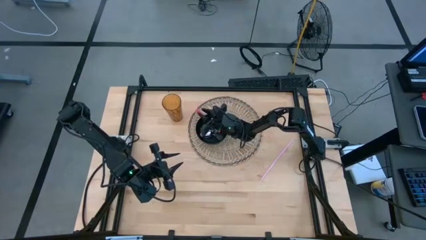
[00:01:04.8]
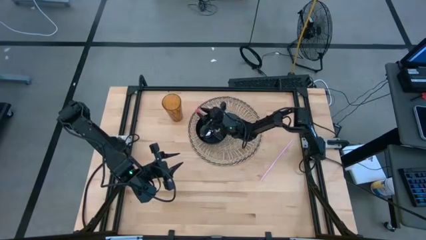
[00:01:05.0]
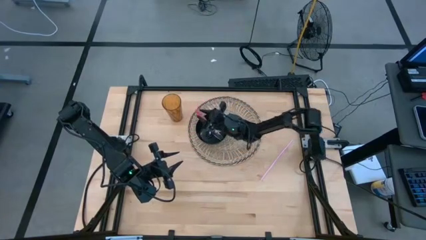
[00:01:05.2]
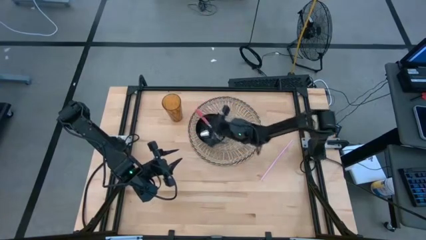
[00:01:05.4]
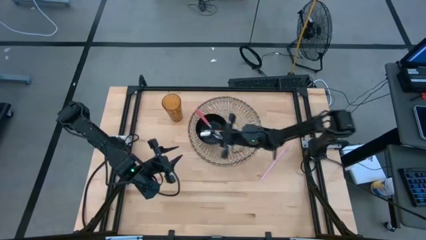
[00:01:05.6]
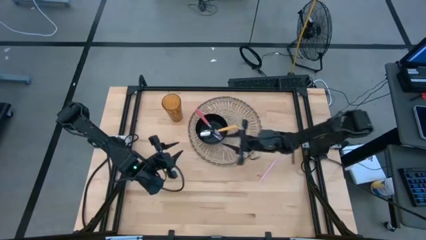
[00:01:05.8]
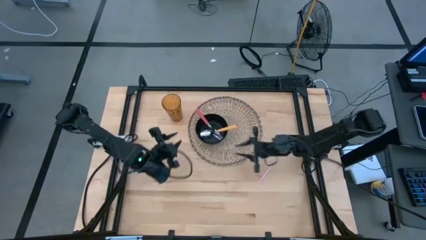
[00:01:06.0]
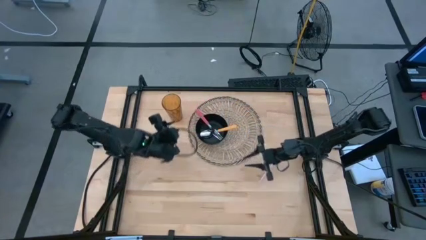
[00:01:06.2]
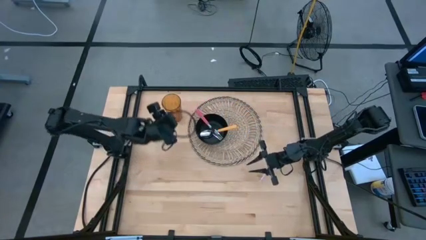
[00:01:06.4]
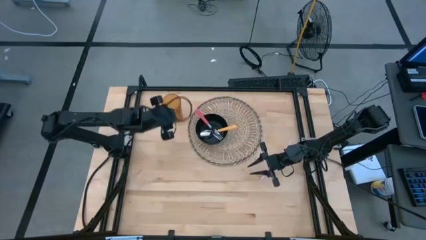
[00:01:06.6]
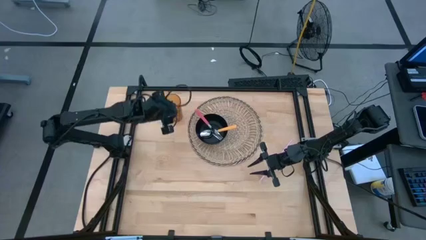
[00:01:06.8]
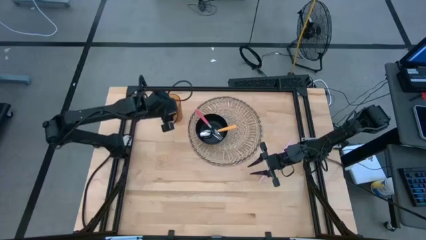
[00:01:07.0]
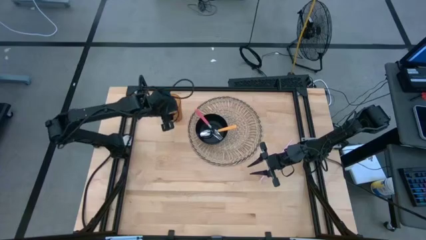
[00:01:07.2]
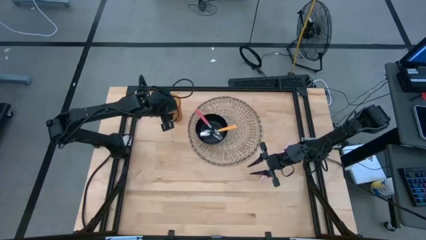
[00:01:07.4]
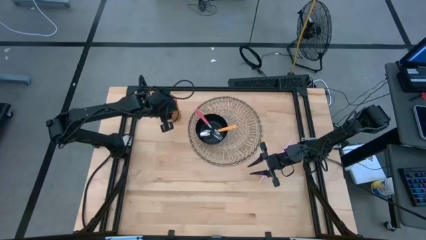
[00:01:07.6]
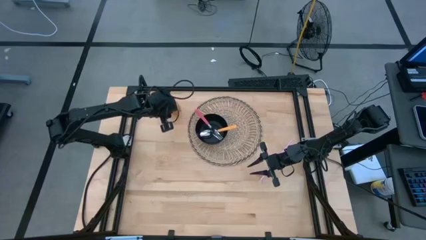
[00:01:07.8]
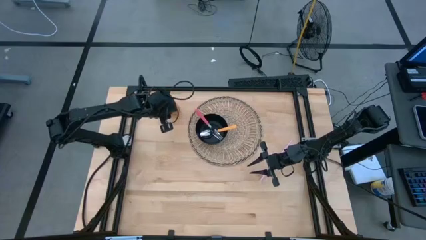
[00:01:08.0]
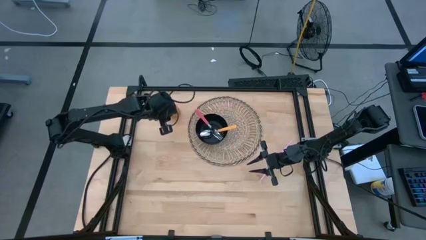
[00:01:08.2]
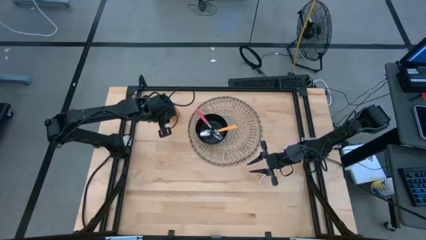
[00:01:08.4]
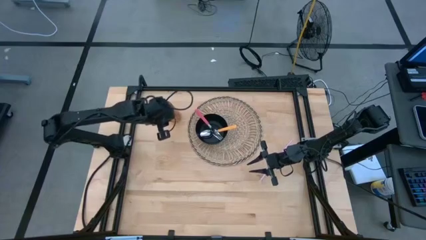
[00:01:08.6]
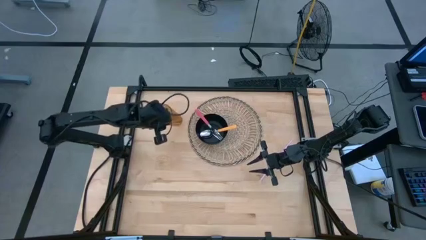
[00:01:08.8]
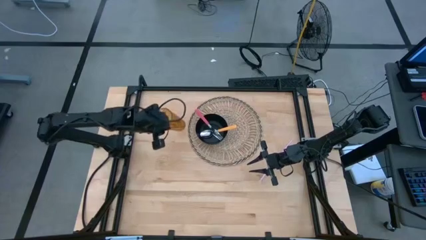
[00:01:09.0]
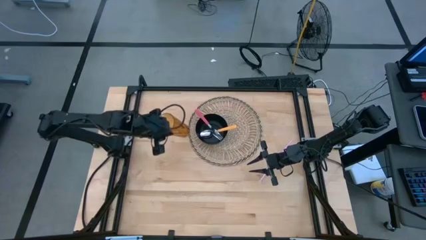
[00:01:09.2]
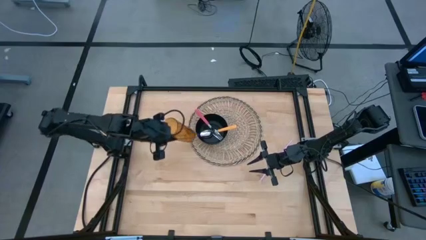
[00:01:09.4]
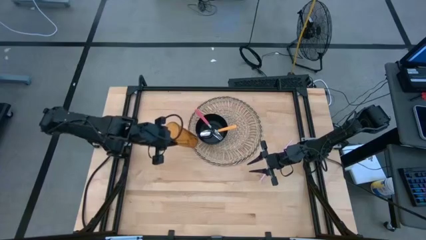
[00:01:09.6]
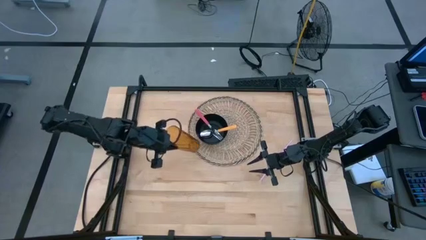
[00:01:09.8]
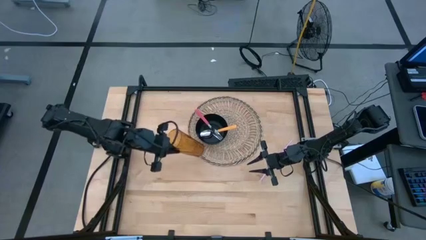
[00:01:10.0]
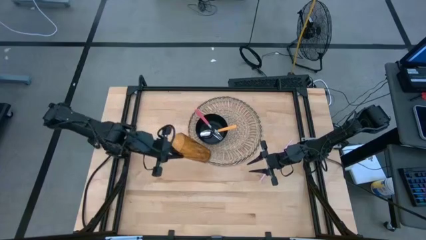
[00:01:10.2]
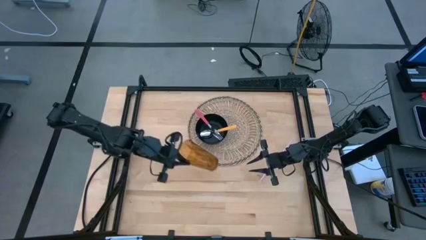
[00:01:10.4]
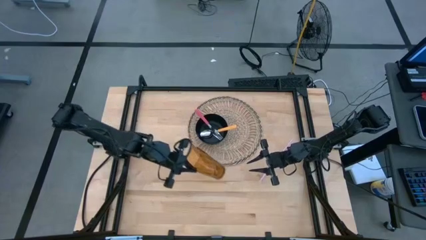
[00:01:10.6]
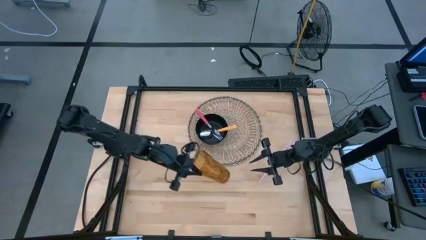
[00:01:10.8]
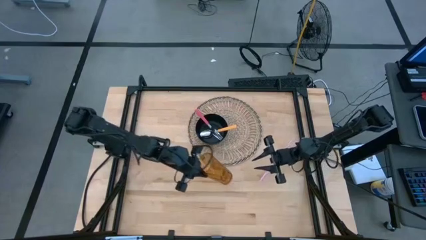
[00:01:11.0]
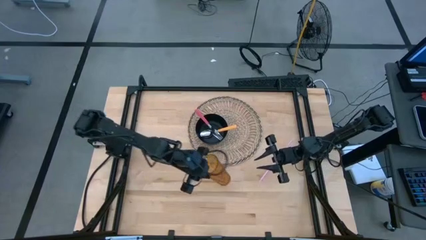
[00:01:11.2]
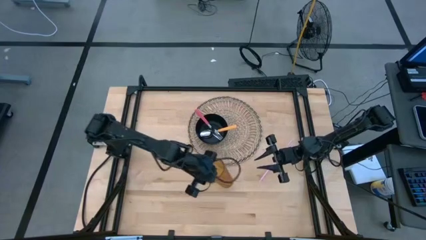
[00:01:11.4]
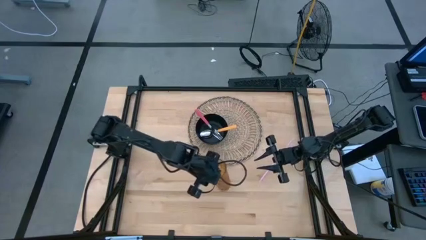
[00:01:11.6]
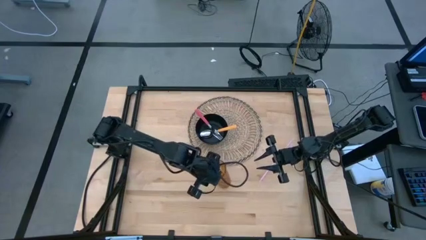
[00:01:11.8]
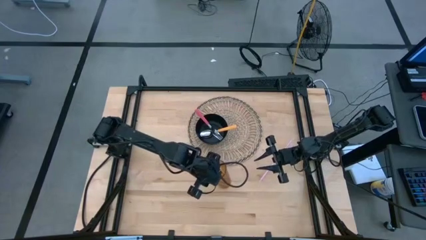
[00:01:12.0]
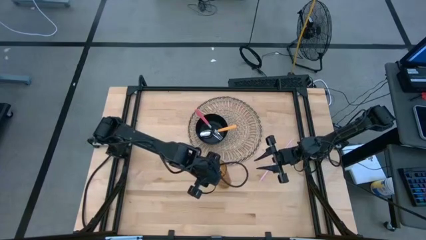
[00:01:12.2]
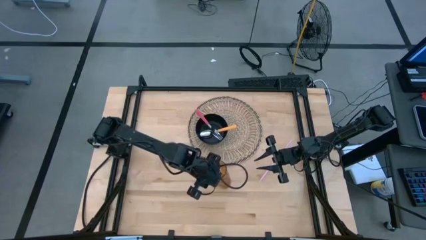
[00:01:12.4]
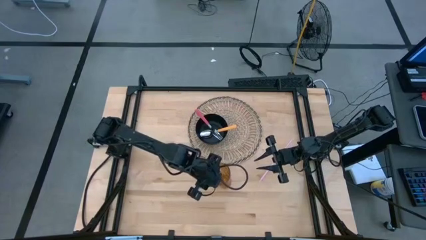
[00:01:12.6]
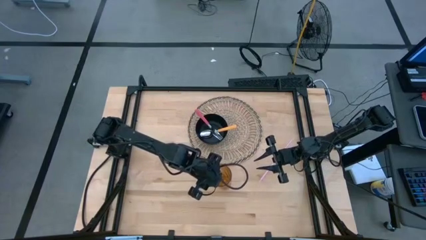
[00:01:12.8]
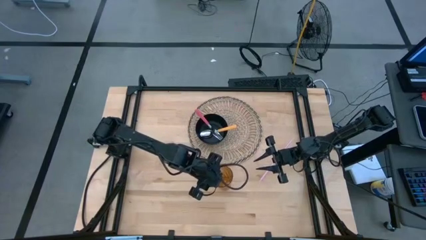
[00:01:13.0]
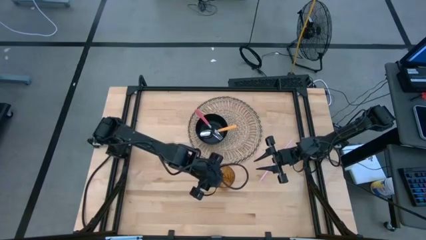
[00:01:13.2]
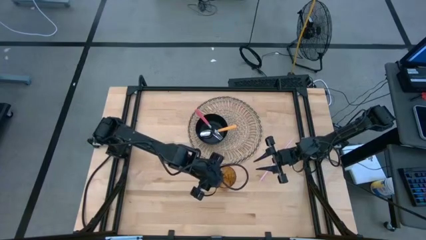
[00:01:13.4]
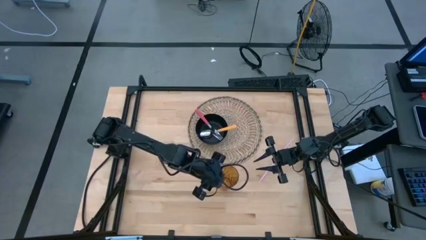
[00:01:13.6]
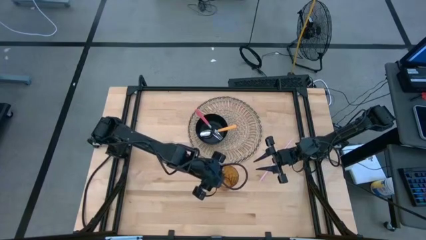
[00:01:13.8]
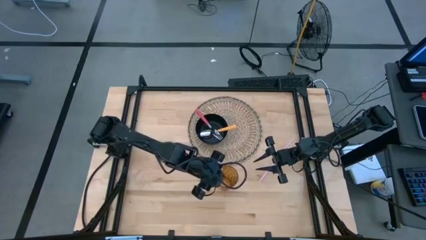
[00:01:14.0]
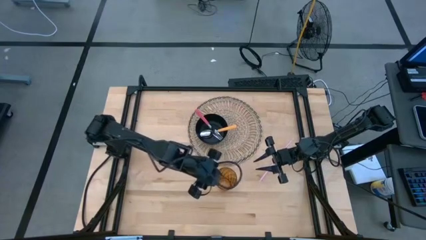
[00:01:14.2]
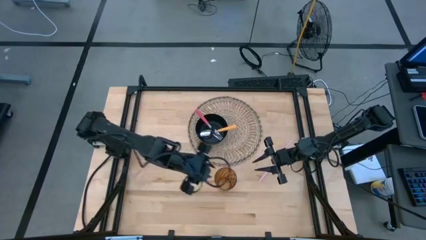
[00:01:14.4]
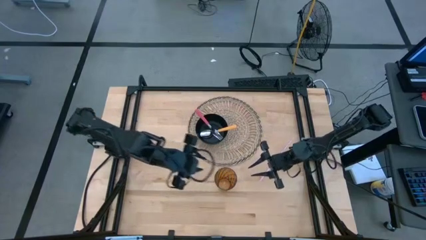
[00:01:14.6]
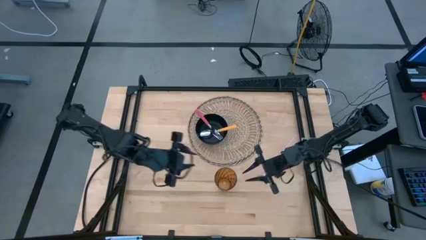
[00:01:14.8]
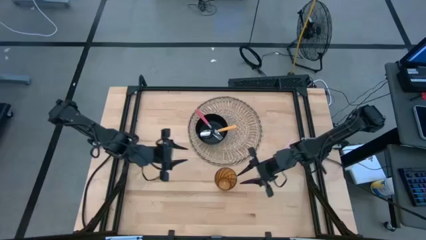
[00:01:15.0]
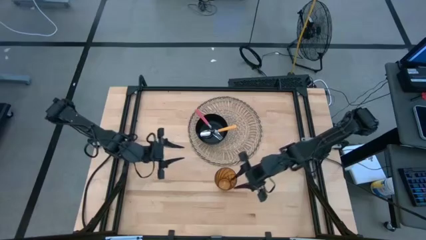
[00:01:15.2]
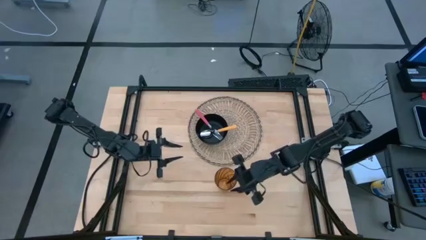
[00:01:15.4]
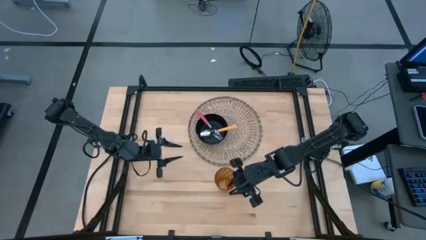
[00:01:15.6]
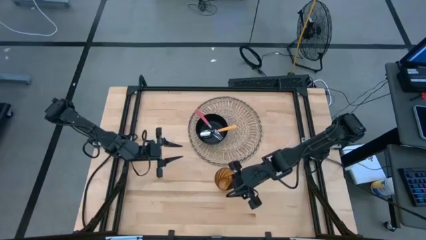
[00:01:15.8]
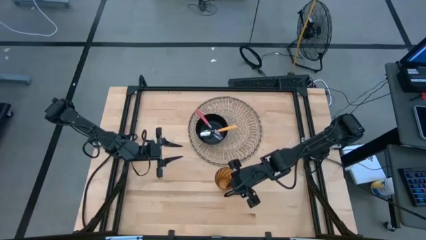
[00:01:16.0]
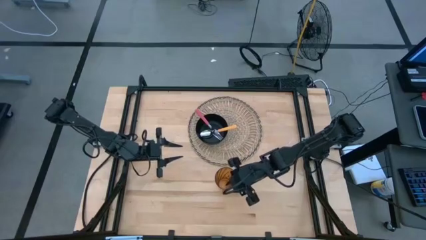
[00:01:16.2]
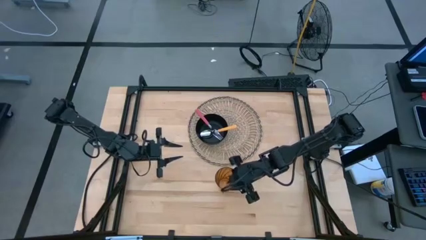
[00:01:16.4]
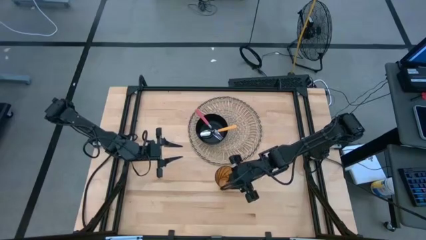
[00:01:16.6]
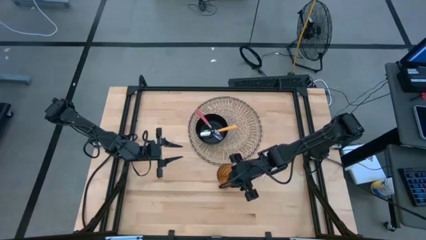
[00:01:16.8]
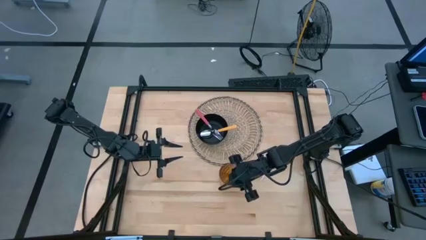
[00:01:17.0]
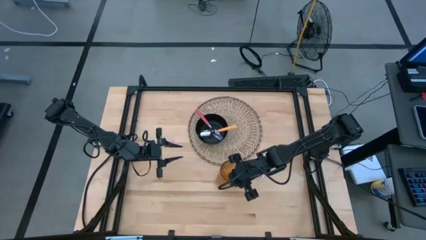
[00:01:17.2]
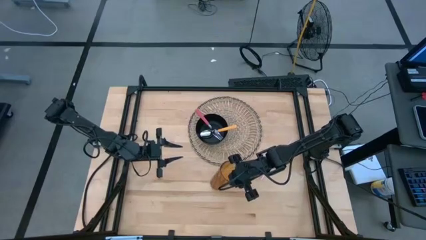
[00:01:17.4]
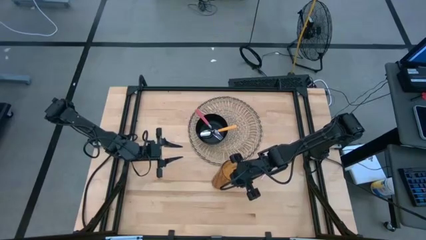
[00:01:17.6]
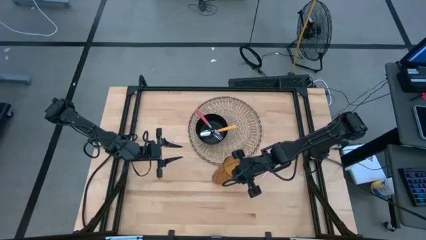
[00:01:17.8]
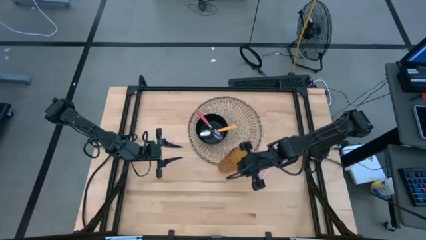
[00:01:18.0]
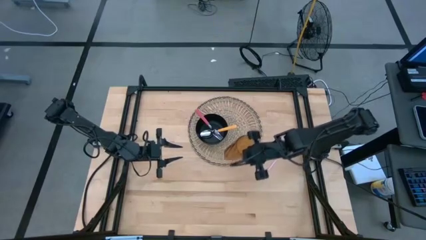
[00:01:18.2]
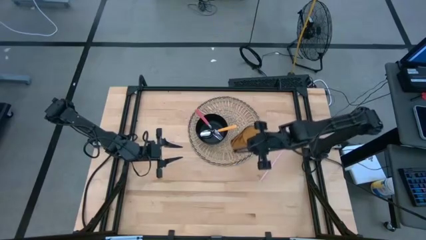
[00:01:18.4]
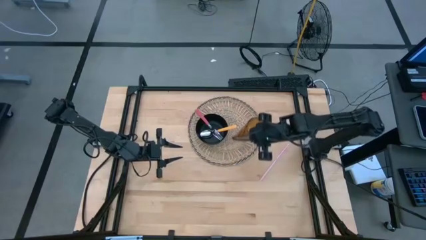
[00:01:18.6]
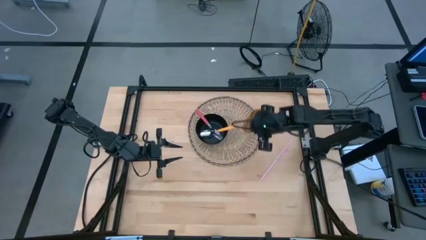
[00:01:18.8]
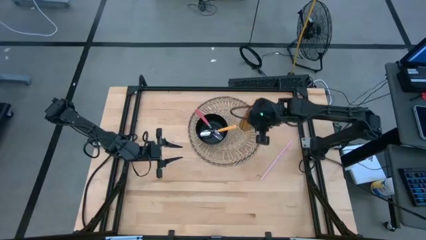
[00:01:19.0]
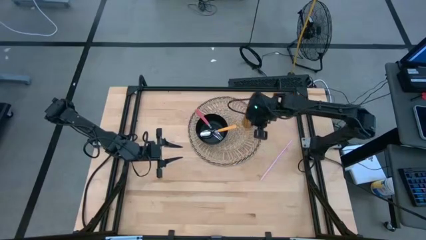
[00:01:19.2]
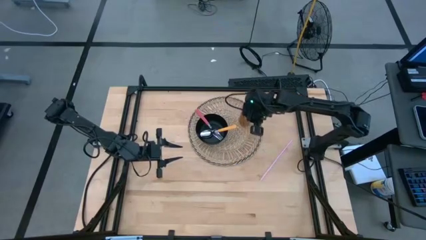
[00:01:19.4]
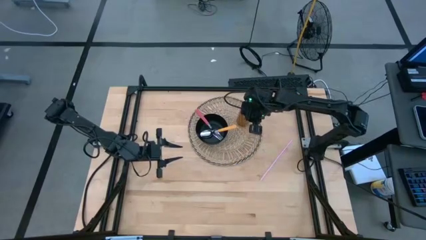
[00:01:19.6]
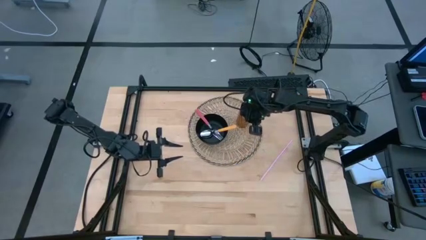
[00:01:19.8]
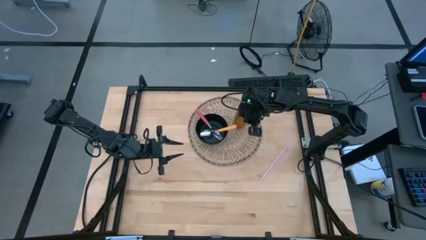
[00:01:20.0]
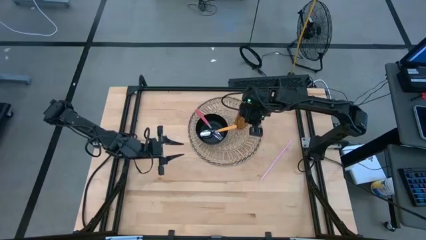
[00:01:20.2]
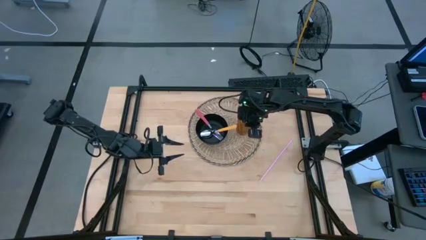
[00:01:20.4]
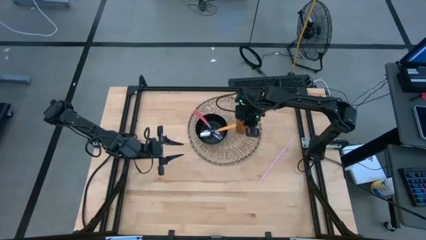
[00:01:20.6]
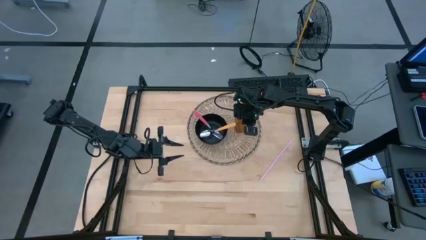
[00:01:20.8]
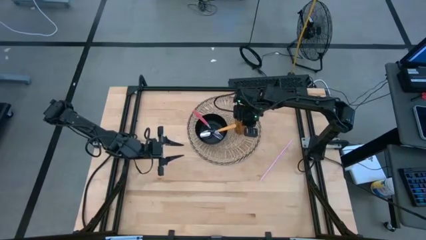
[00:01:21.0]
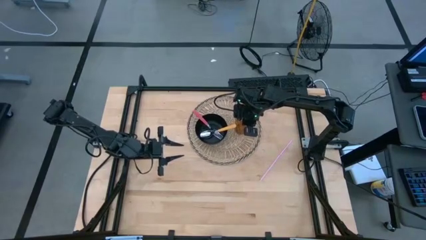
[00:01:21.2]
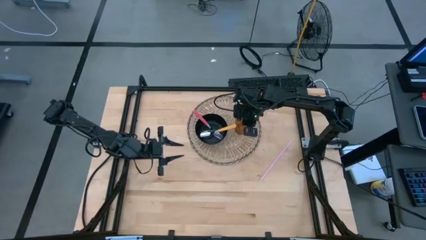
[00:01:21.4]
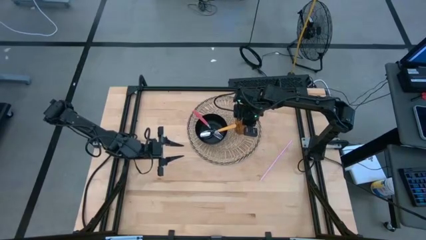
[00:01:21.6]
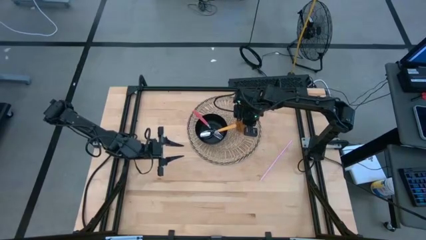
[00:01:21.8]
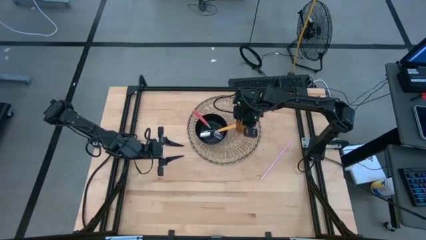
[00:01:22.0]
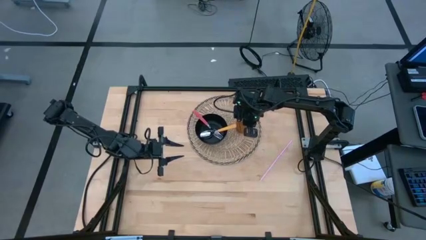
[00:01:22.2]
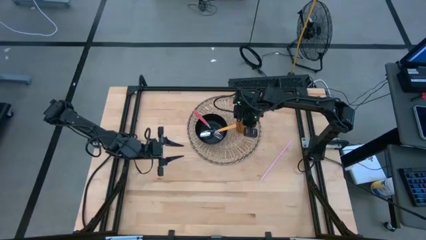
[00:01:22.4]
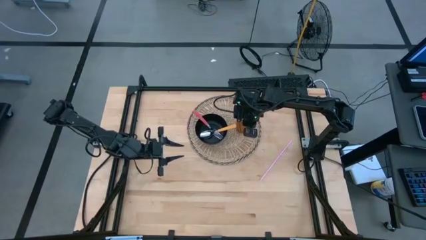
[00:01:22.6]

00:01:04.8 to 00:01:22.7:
Task: Pick & Place Utensil
Put the brown cup to the right of the black bowl on the brown mat
